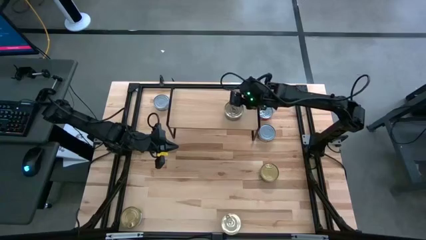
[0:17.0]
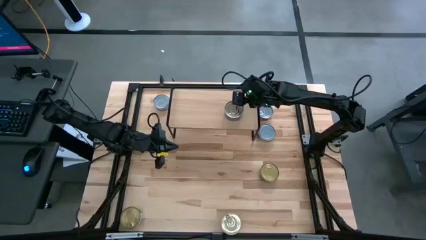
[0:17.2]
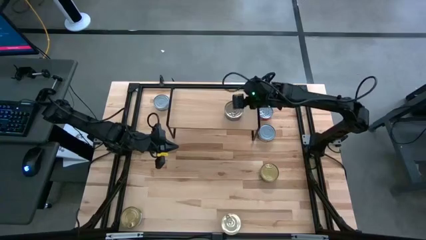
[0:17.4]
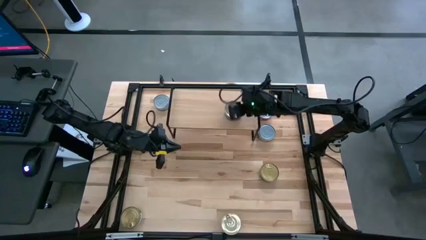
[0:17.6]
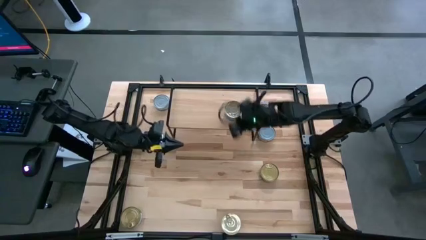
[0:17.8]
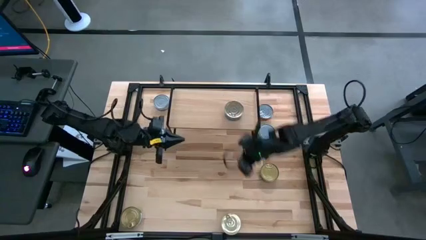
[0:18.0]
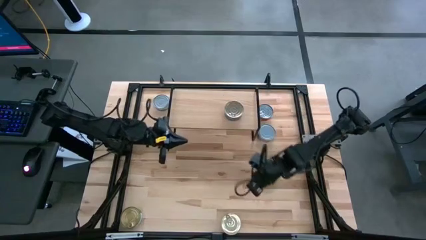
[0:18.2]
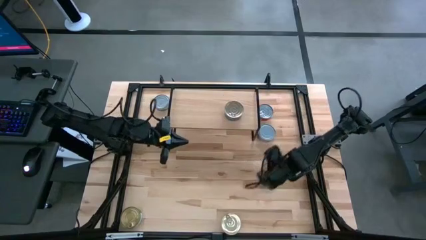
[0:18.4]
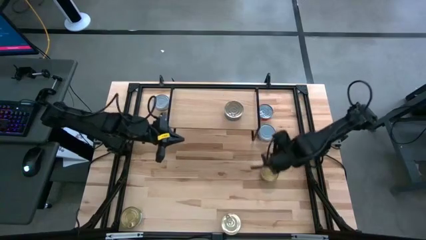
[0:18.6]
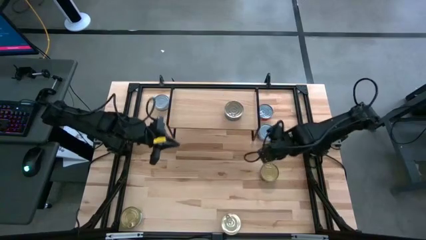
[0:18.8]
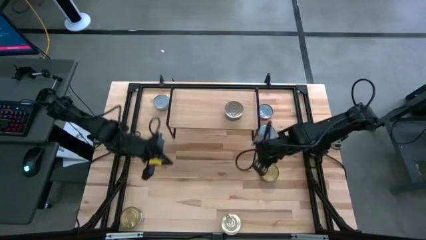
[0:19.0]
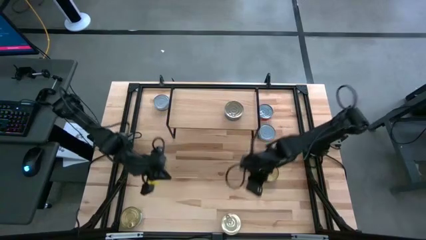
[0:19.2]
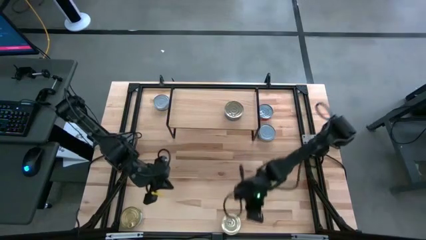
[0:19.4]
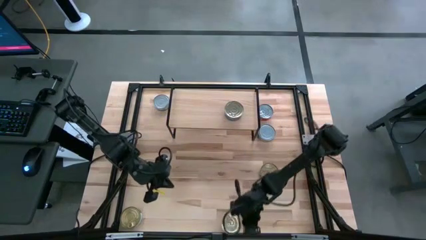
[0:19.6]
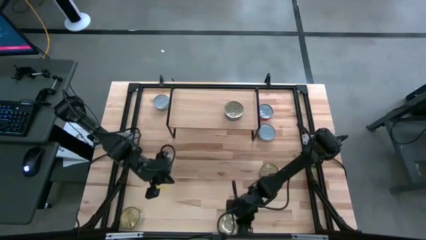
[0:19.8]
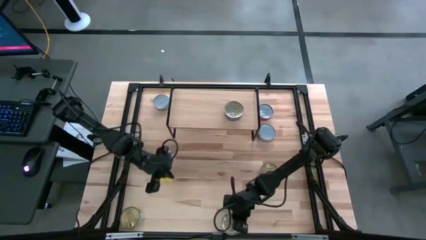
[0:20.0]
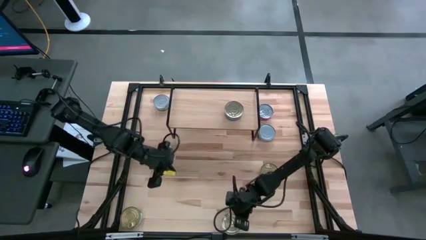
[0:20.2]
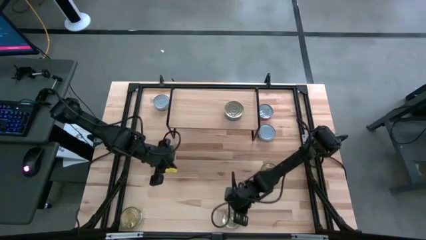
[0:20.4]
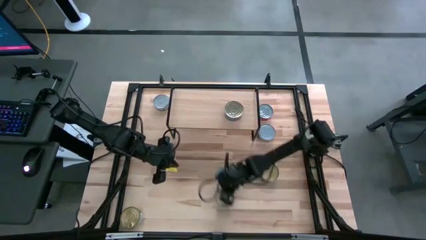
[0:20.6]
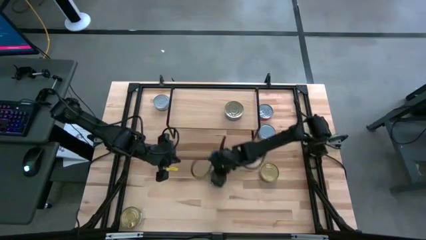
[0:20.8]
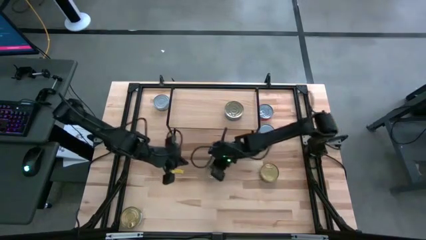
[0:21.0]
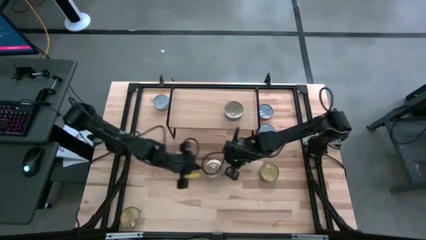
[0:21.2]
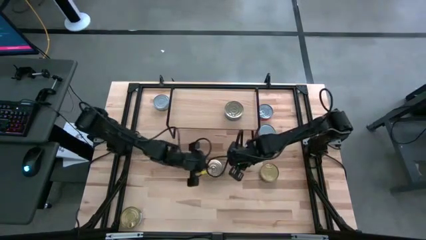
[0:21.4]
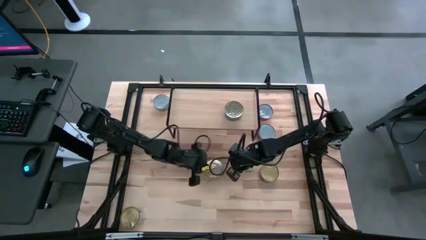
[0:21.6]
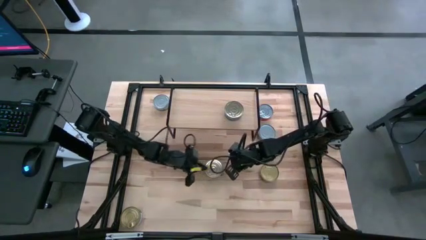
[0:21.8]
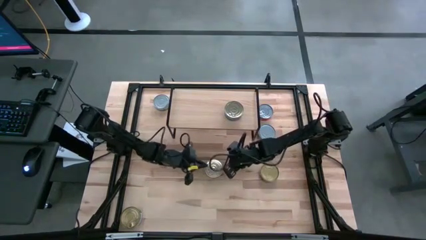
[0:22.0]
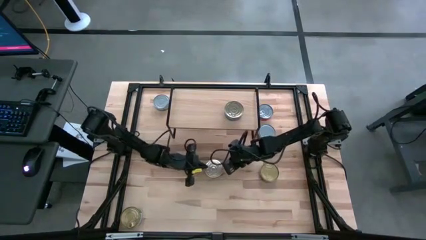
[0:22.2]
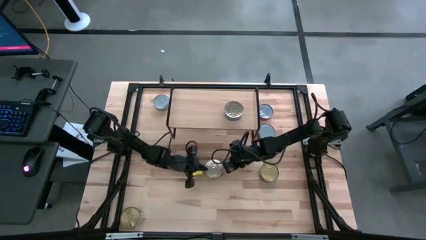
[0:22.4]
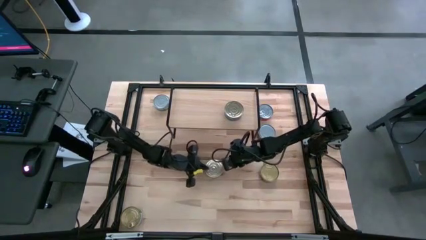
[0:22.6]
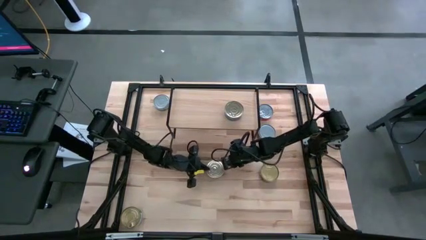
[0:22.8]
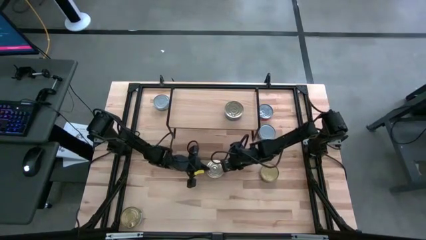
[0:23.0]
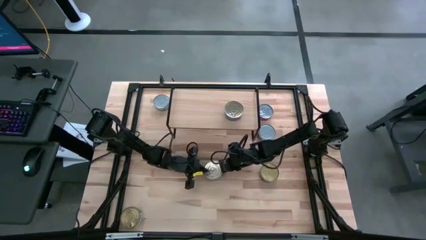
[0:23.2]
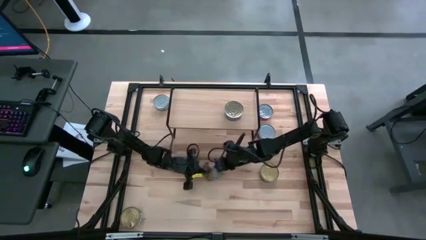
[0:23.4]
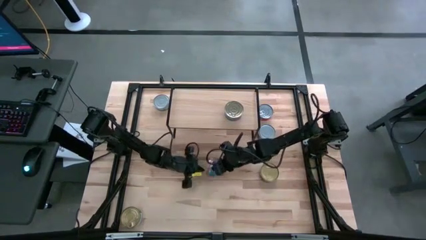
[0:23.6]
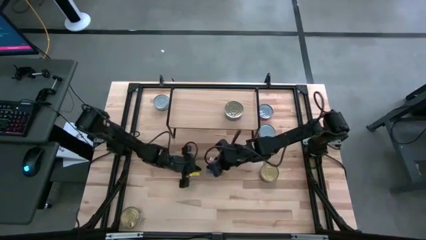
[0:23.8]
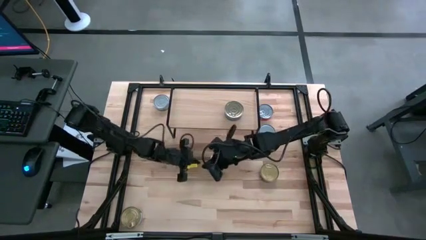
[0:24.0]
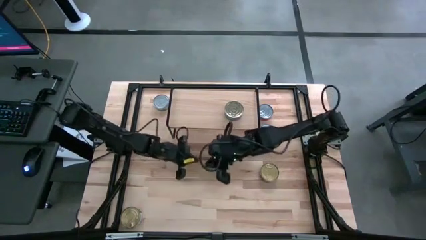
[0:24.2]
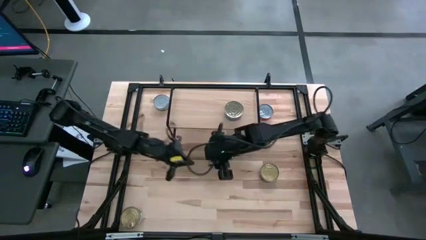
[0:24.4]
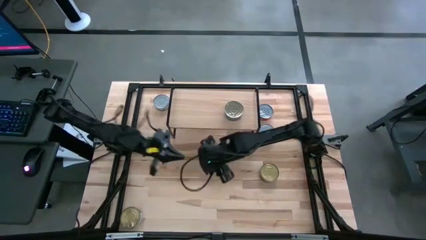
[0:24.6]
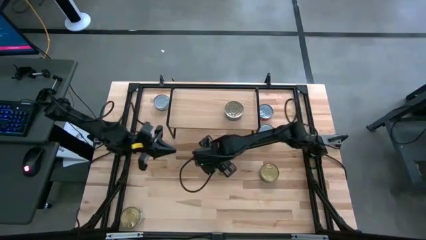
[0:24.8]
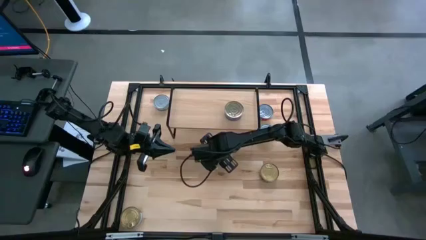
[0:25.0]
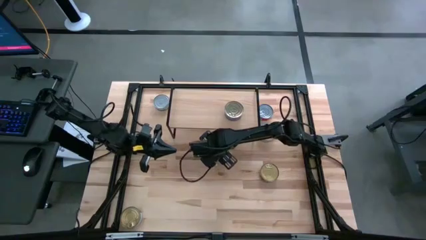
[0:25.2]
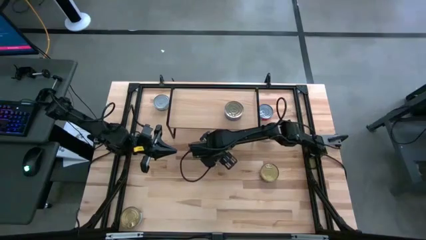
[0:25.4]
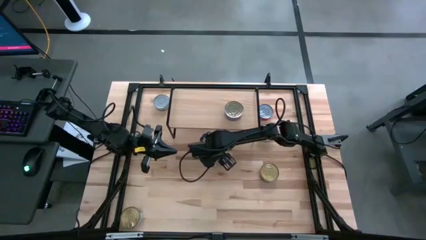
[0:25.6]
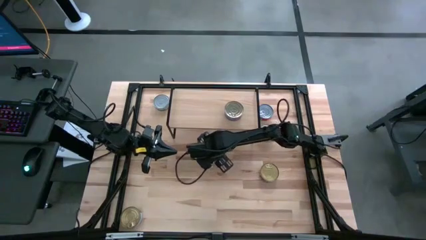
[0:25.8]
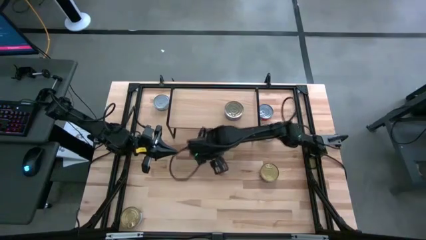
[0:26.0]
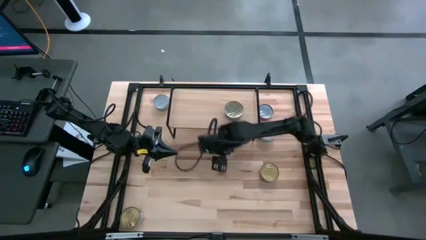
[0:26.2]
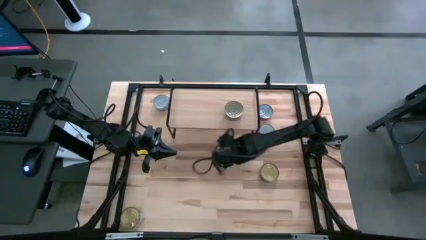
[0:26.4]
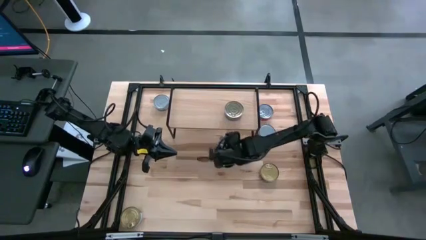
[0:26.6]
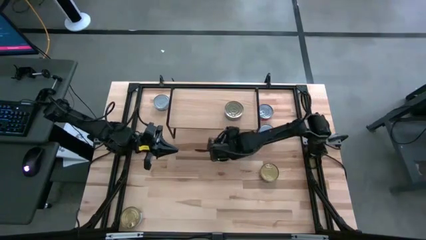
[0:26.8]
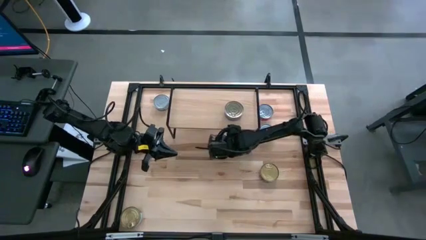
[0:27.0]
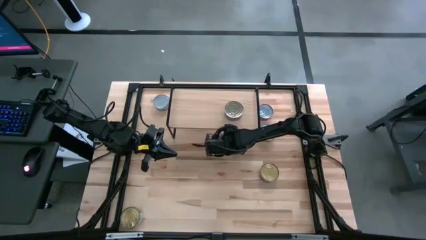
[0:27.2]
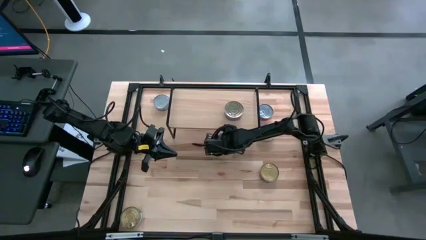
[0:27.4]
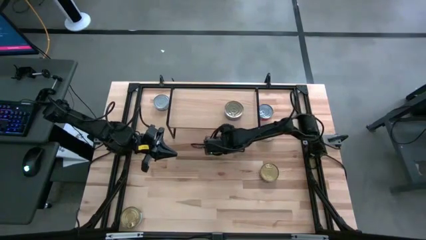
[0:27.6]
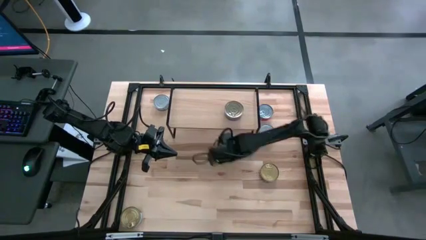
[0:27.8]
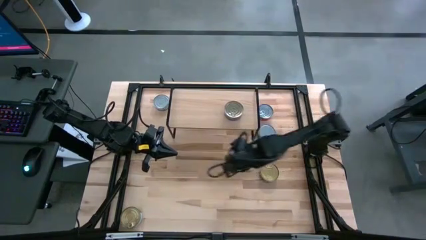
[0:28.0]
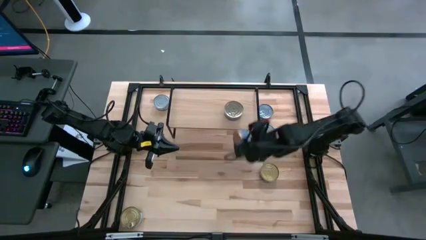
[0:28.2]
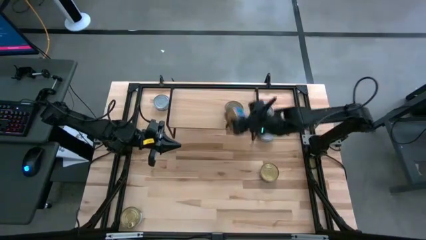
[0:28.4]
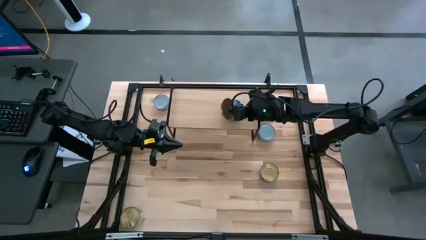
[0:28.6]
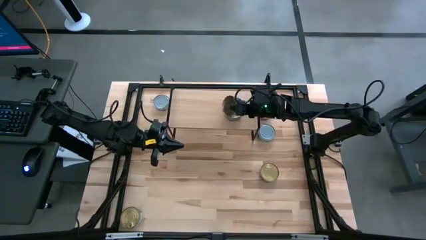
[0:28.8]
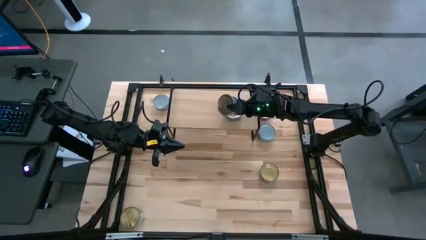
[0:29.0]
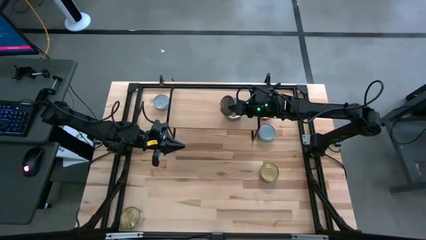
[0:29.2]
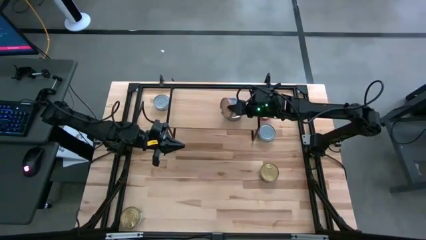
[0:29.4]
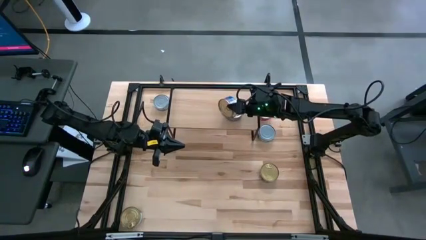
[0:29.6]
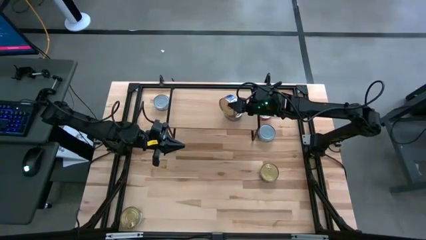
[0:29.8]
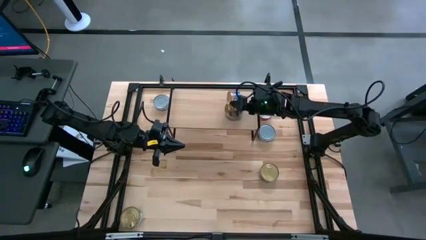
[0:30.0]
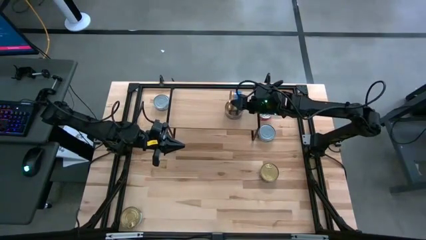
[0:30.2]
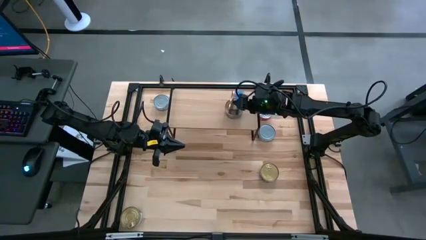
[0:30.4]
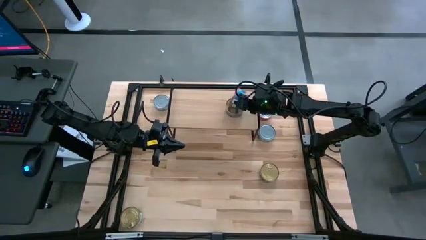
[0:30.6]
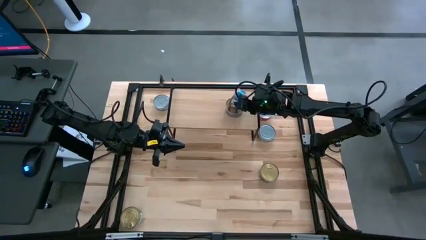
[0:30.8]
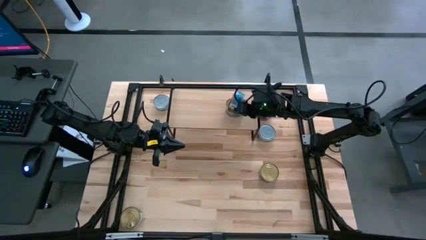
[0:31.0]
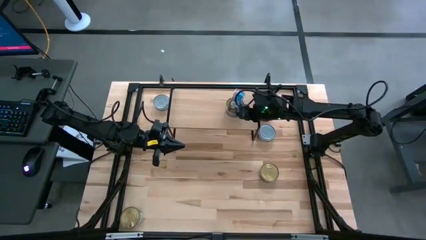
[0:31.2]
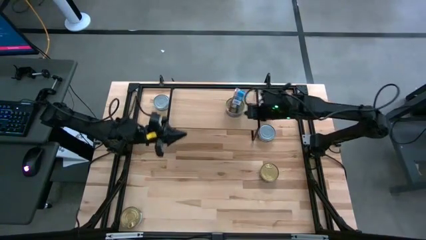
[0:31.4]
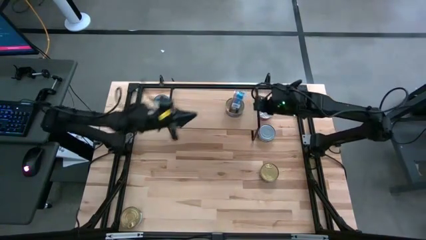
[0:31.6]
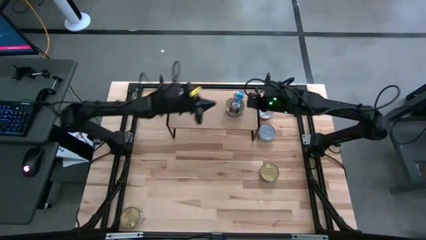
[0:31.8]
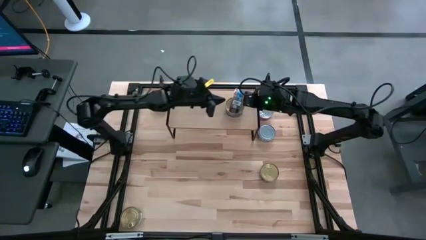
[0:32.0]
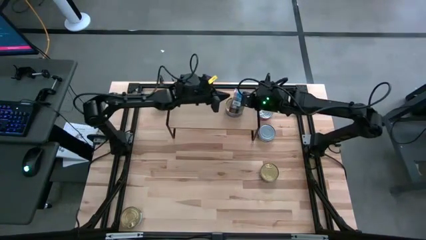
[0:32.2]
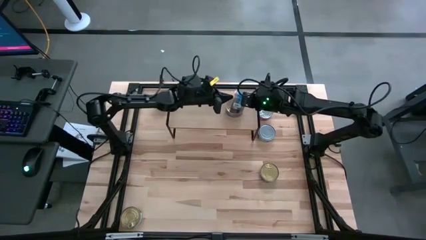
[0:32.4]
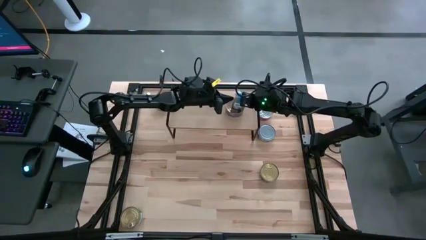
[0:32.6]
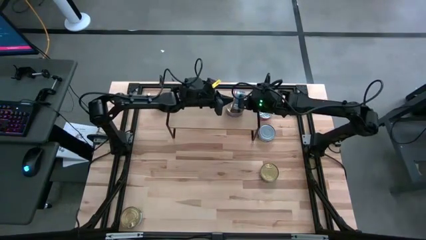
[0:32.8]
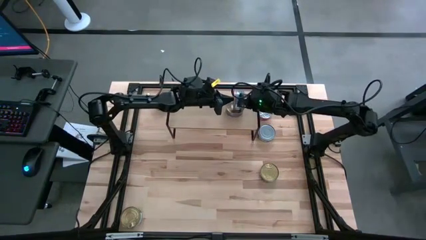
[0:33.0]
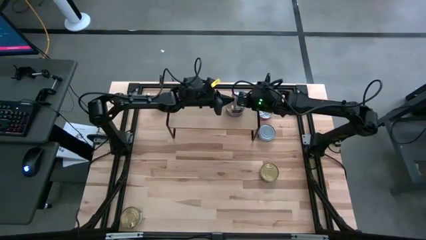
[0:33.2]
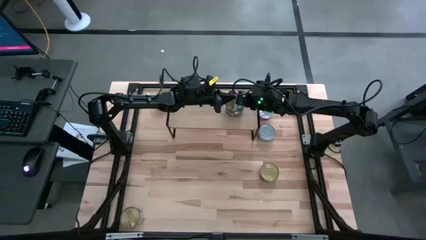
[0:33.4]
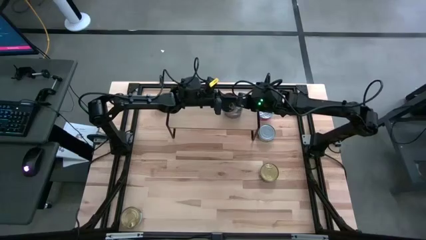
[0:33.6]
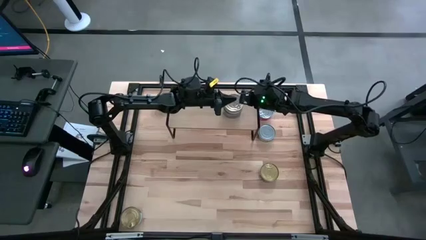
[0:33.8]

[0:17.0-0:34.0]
Task: Stack canned seafood by type on shelf
Stack the blue pink tuna can on the other blue pink tuna can on the shelf

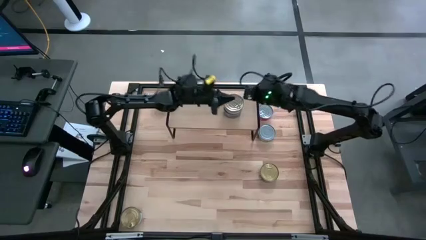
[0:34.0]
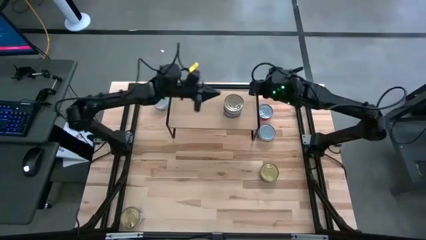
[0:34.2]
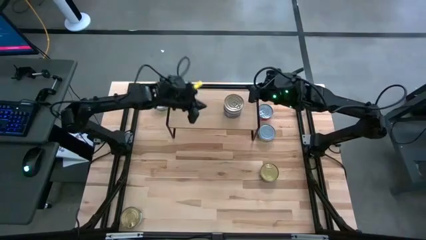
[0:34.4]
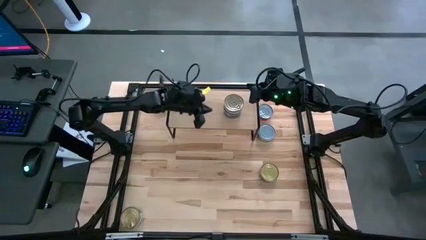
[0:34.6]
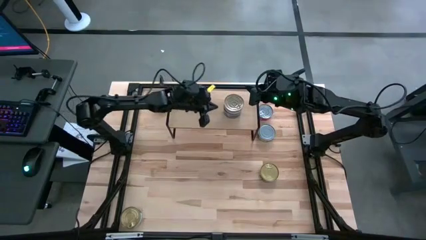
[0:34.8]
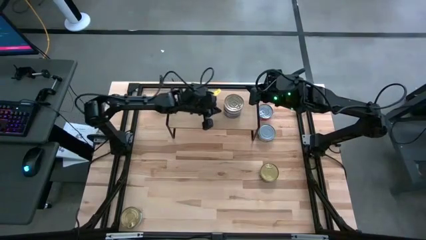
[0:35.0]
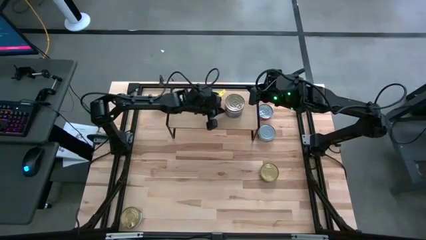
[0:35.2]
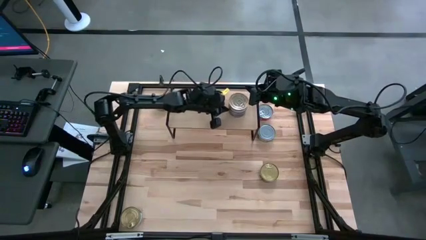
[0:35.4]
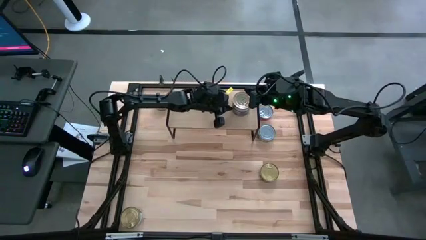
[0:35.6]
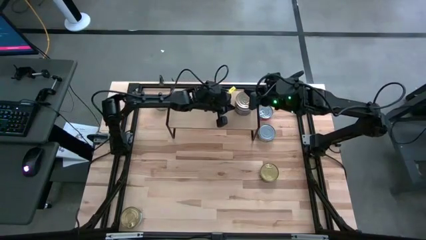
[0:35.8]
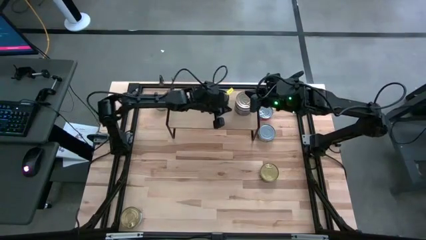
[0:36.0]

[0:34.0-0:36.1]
Adjust the stacked blue pink tuna cans on the shelf
